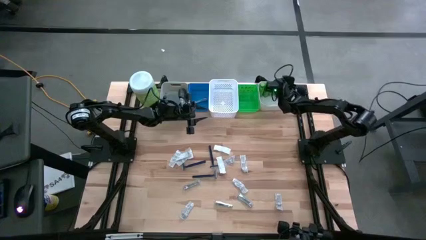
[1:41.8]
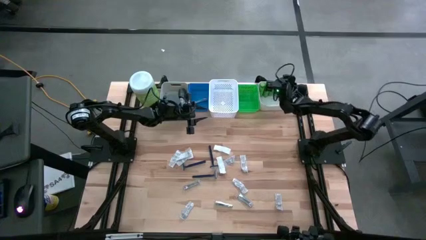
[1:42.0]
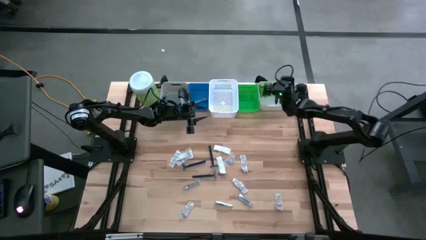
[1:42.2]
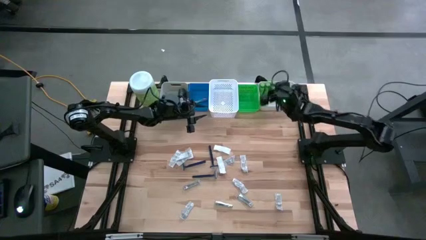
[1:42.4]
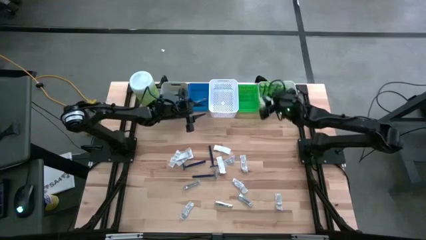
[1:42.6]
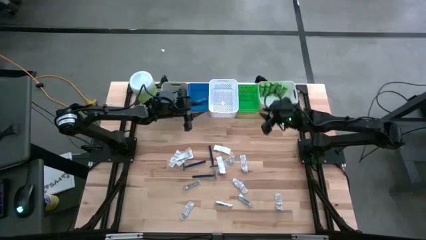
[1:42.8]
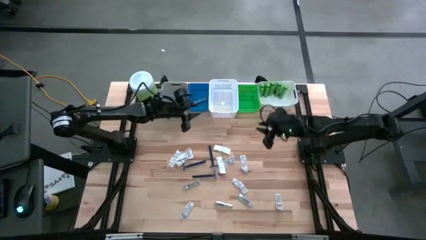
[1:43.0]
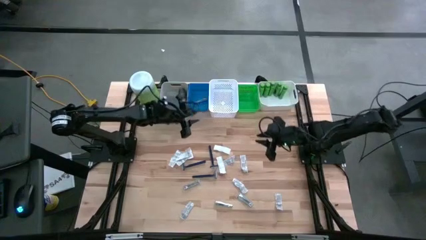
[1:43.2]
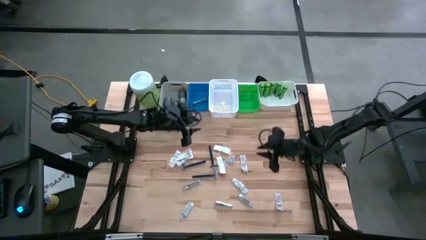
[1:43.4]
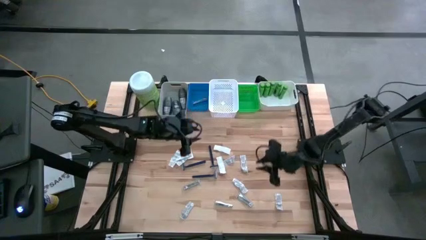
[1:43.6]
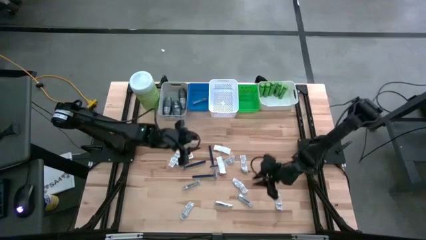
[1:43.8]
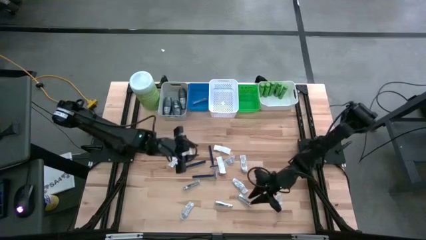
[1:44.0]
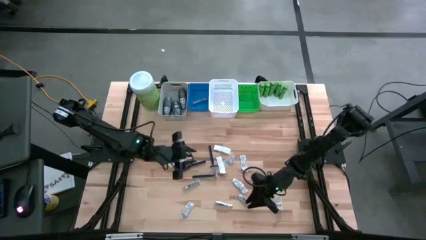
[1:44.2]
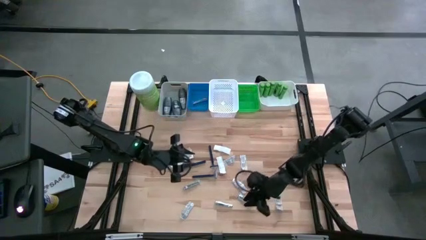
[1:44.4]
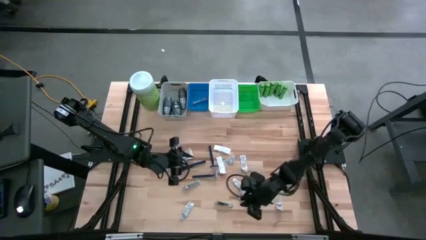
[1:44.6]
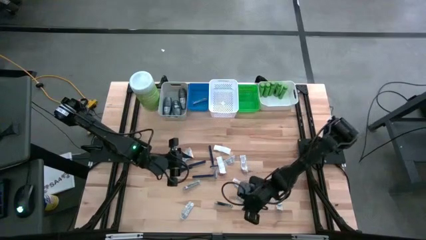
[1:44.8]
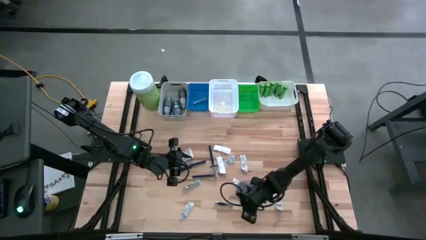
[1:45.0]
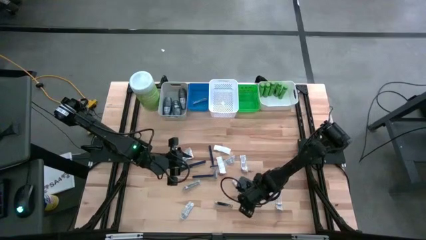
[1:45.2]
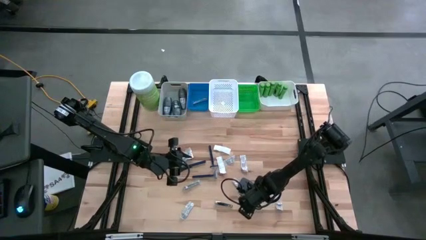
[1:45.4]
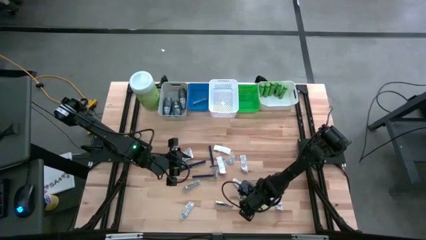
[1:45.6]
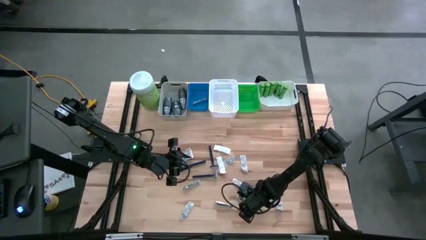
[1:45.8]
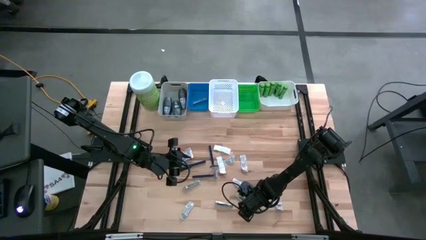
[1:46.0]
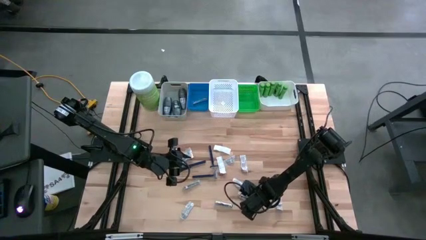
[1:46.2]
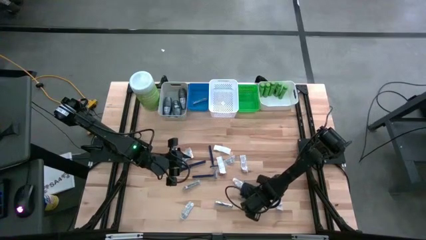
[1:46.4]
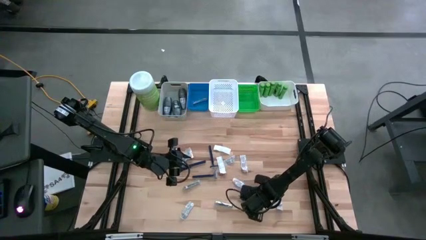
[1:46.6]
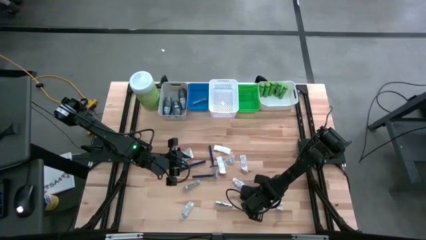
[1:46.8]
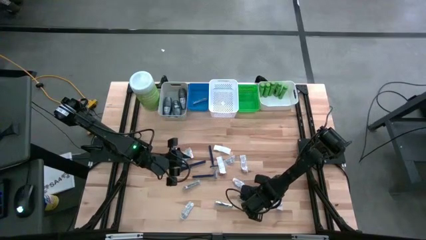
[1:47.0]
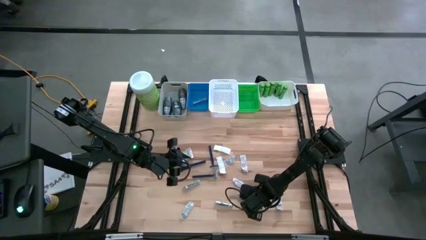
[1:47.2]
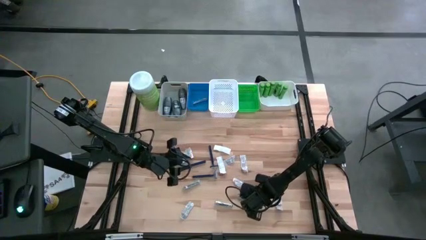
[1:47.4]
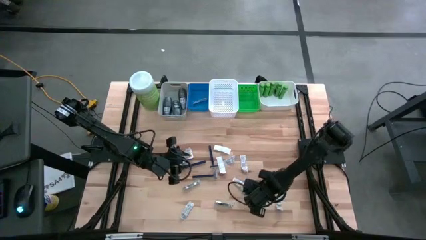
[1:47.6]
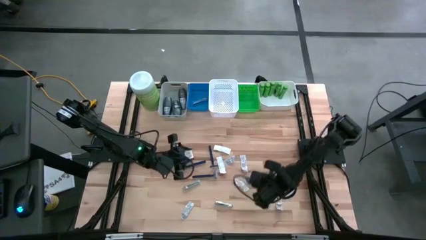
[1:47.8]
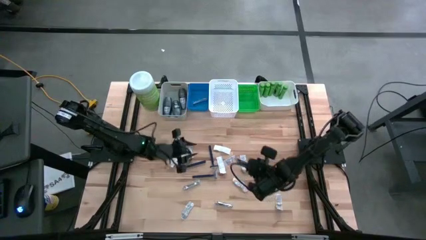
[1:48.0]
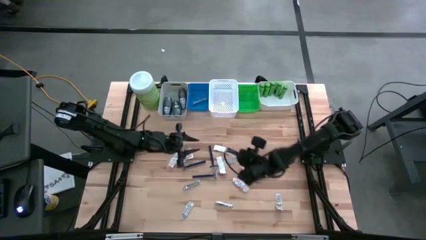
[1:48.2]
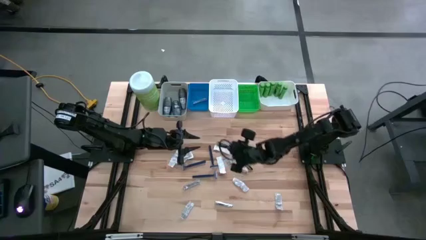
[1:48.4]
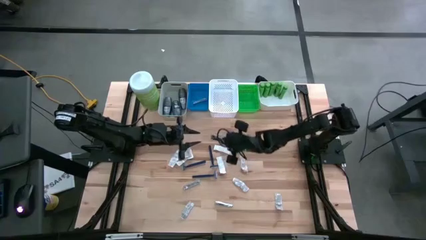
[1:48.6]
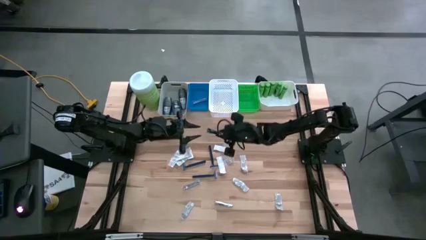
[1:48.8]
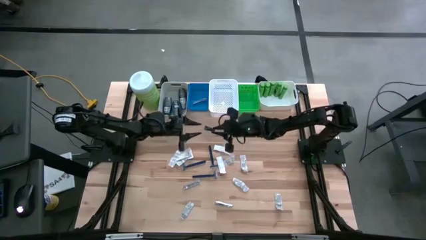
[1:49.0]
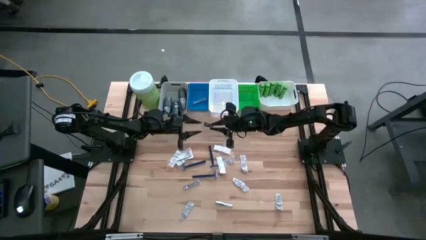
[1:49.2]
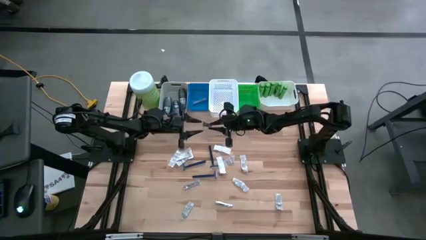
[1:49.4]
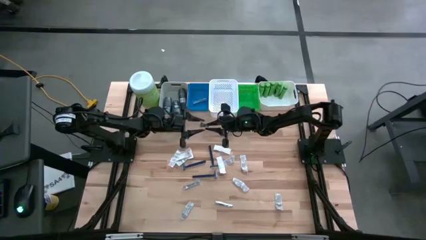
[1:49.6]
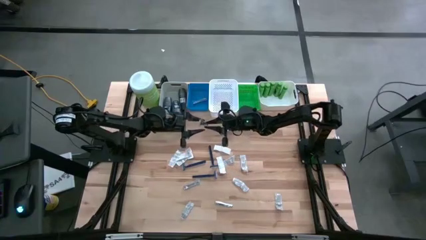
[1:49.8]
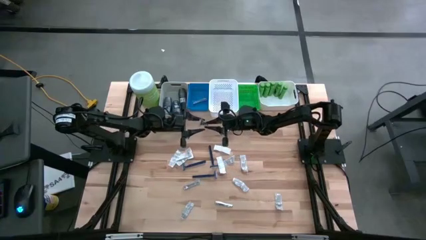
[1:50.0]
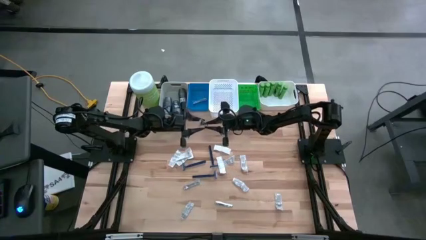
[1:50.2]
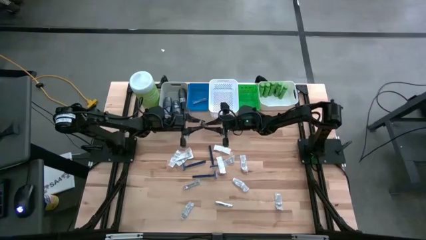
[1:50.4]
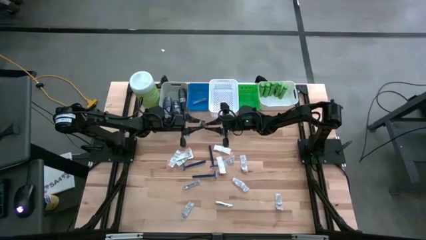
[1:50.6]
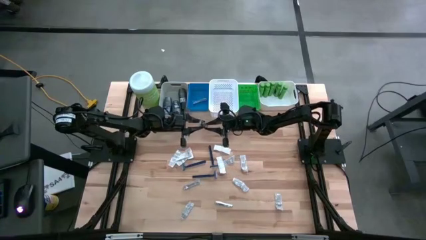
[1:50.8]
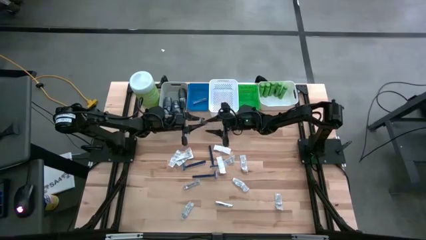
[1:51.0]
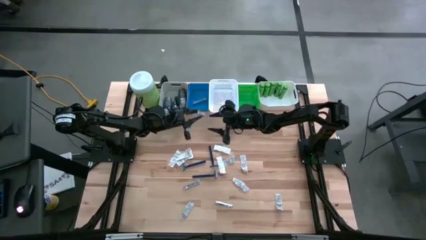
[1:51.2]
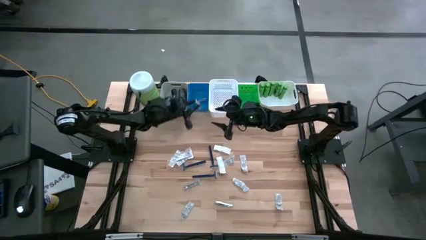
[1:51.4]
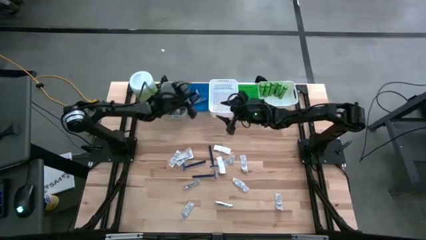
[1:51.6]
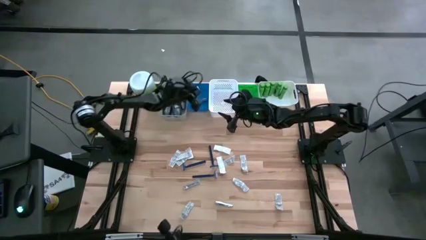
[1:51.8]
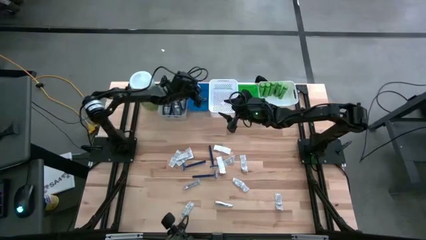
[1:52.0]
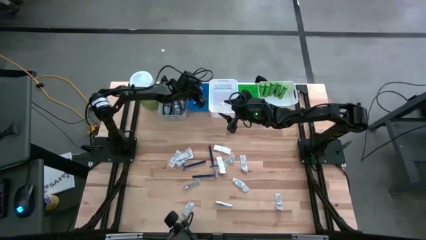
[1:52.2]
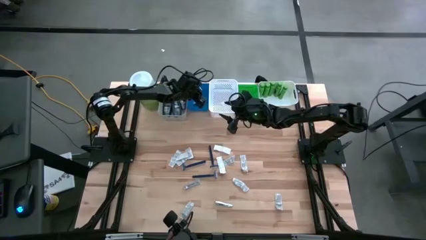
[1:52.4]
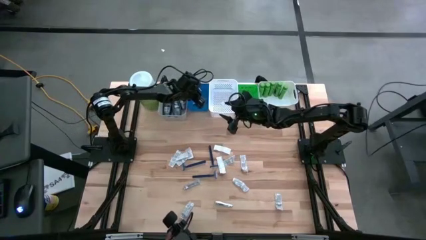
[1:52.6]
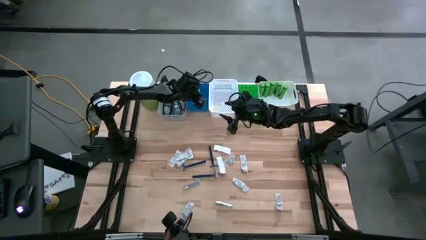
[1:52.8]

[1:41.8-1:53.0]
Task: Pick & Place Travel size toiletries
Put the bottom right silver nail cutter into the blue bin

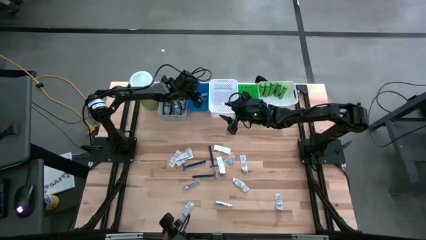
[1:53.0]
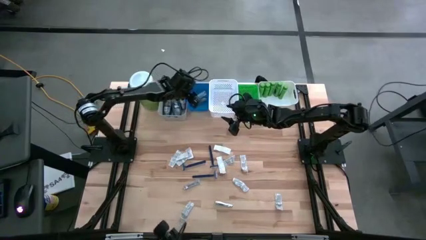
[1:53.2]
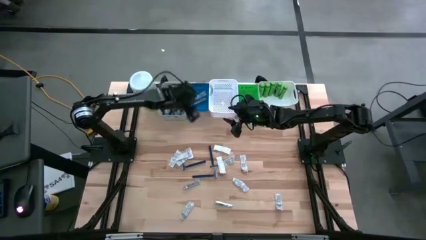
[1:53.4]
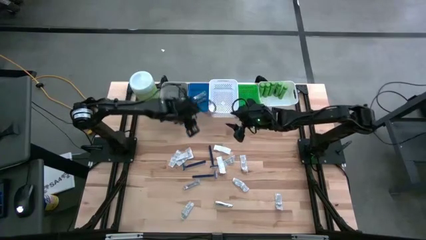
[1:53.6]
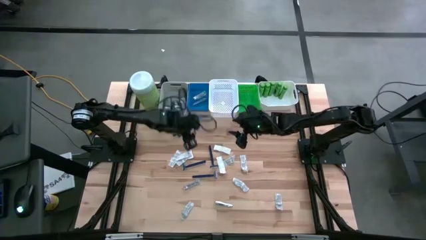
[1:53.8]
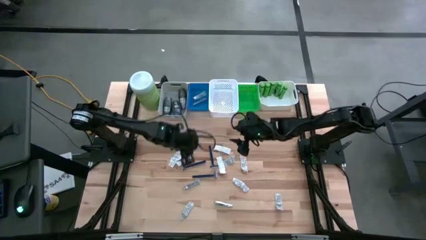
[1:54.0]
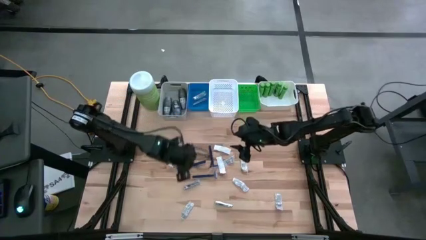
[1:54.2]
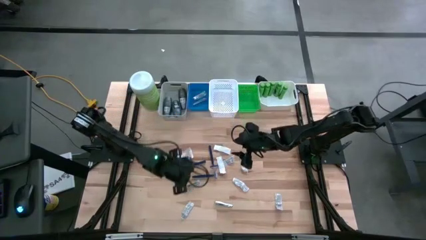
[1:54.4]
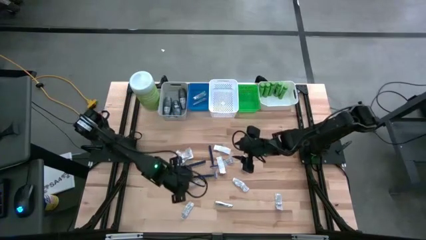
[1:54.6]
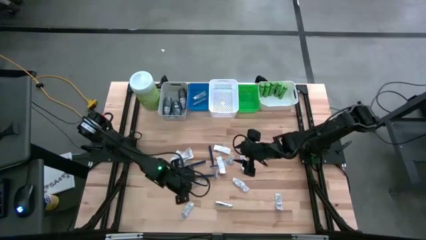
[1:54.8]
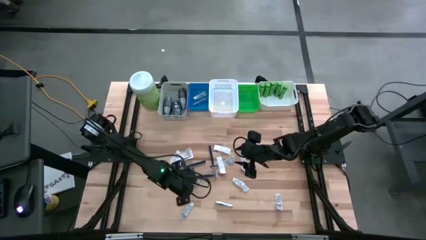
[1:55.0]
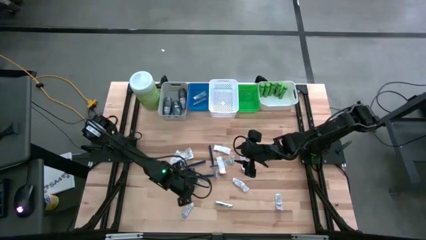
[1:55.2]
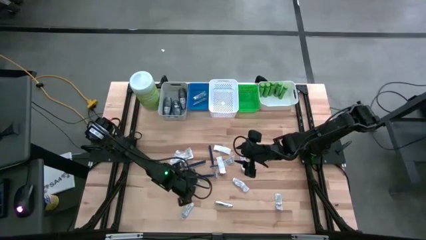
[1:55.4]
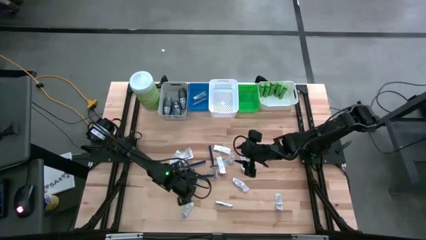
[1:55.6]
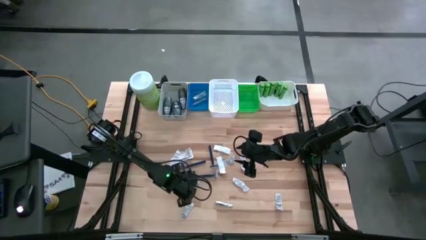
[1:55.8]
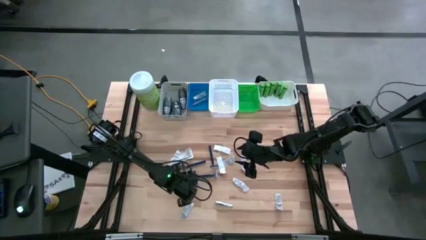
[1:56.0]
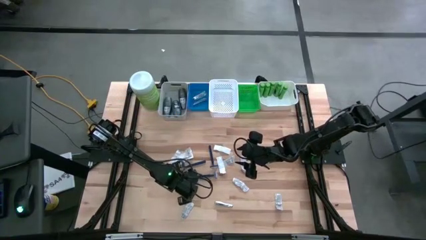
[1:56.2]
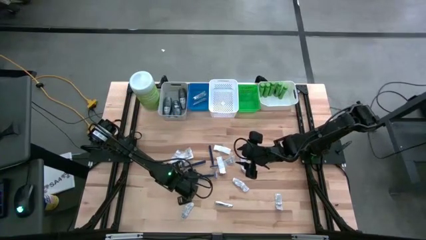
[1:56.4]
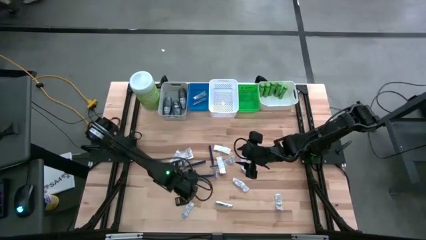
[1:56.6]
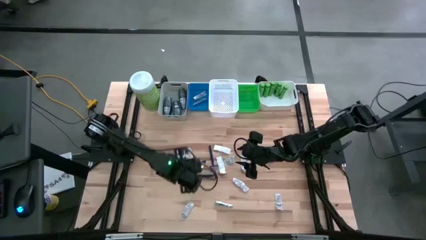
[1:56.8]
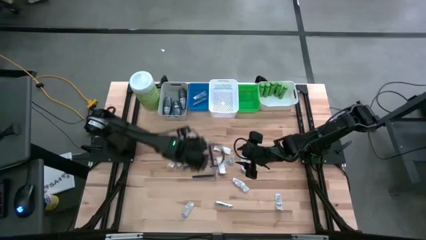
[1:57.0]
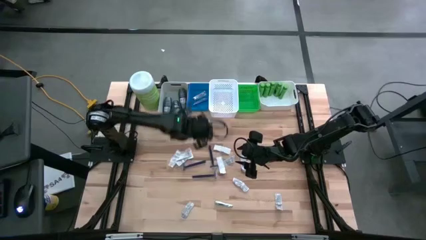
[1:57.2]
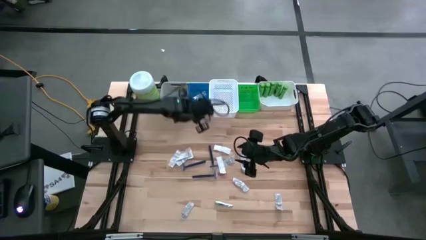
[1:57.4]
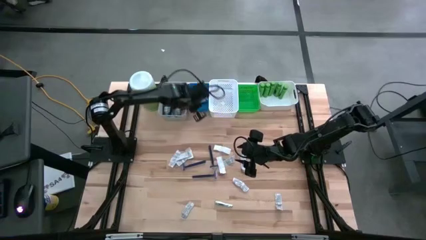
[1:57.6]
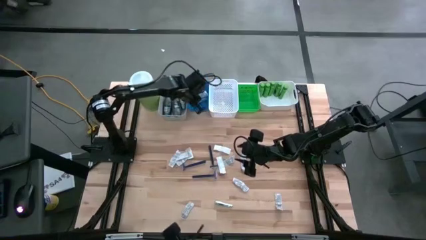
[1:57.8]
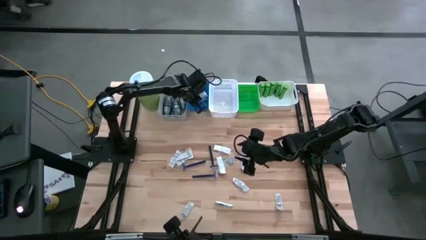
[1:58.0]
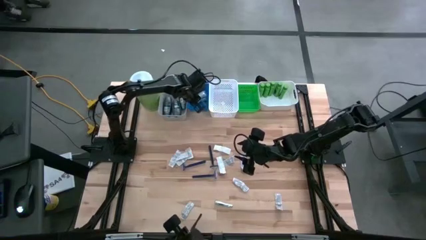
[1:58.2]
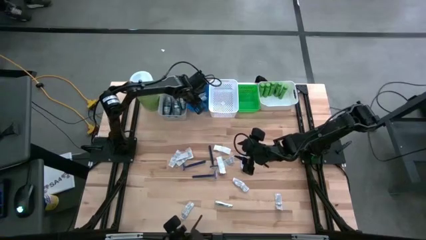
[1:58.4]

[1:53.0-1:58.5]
Put the top silver nail cutter into the blue bin

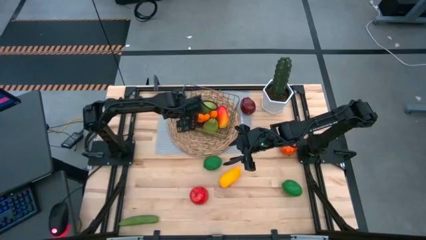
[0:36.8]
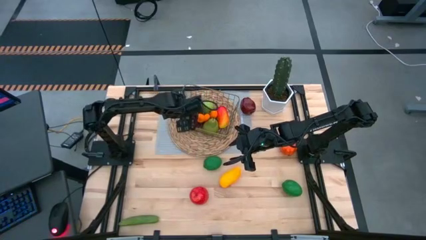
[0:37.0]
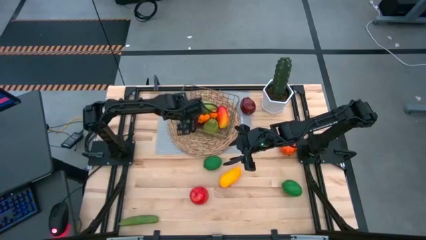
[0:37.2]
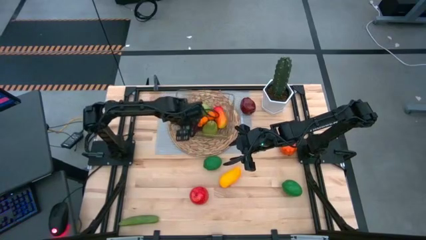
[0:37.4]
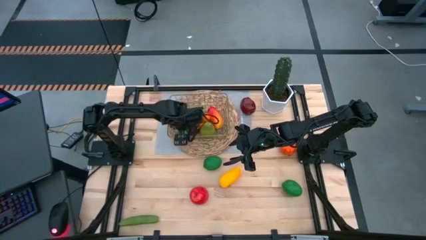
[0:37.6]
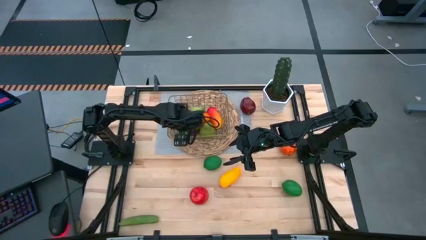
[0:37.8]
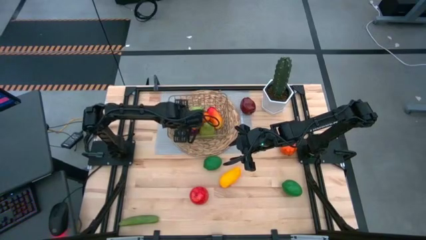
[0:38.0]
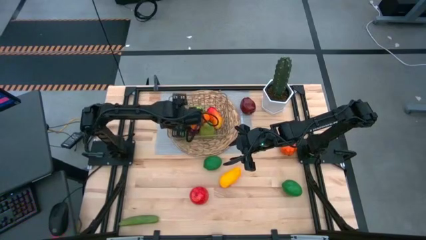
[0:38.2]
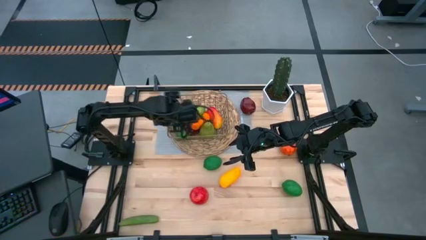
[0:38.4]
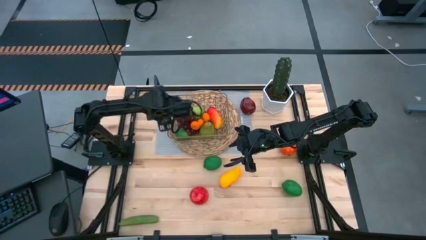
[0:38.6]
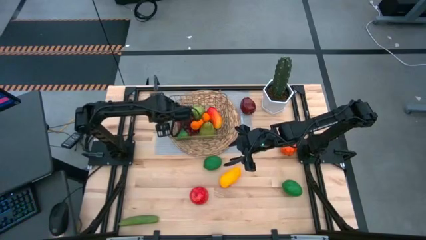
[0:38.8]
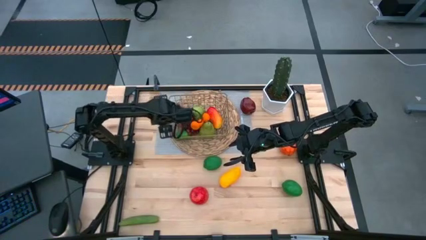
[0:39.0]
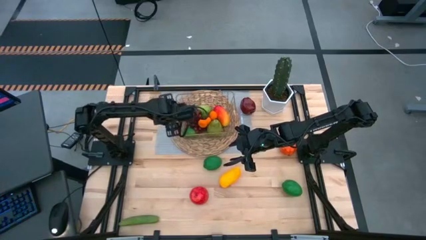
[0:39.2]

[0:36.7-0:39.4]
Task: Build produce basket
Adjust the gold wire basket
